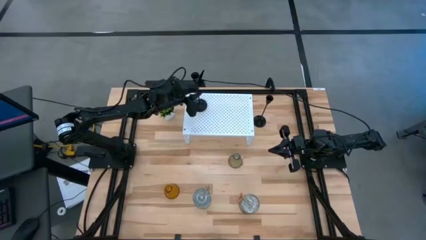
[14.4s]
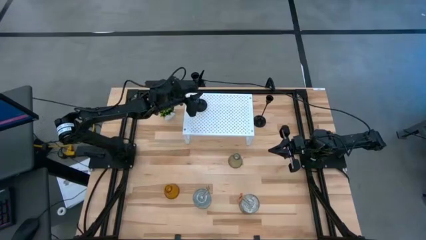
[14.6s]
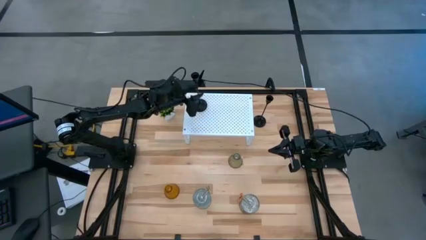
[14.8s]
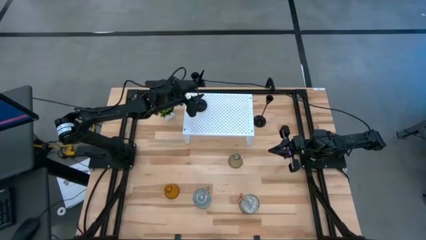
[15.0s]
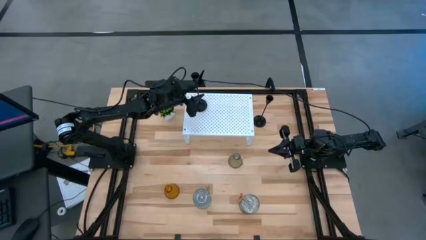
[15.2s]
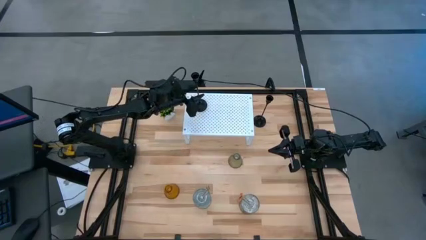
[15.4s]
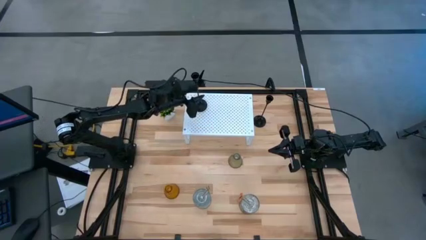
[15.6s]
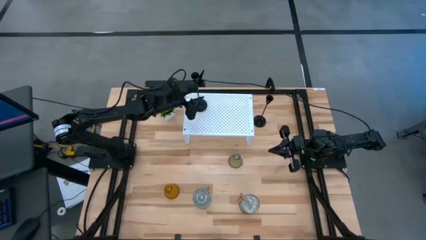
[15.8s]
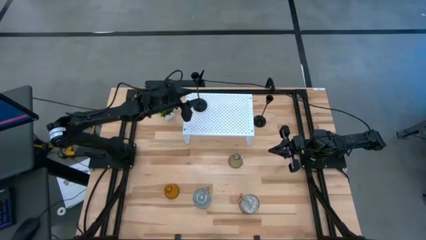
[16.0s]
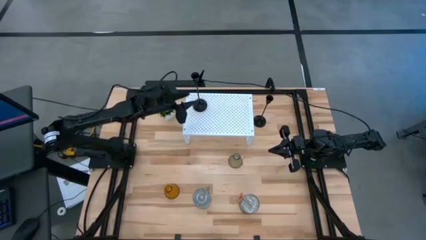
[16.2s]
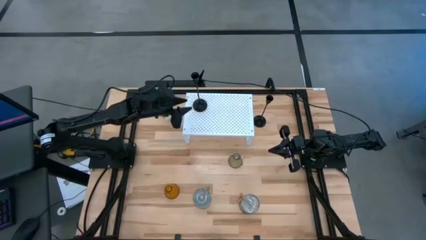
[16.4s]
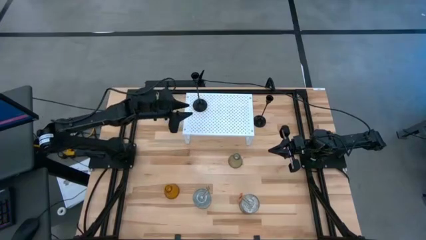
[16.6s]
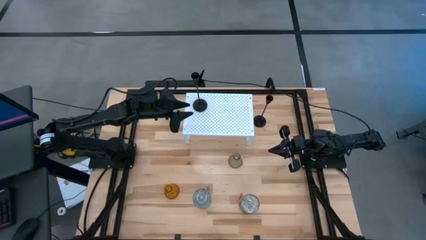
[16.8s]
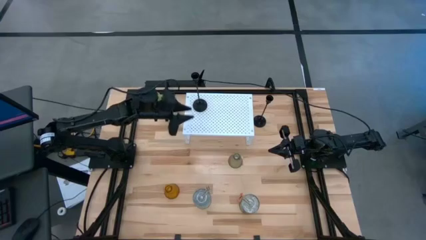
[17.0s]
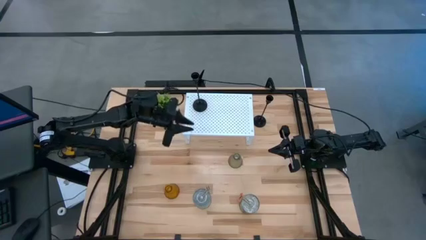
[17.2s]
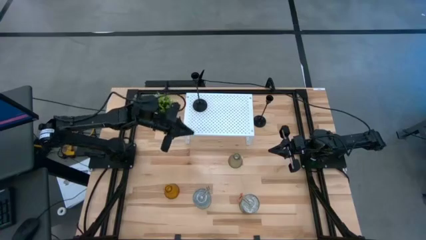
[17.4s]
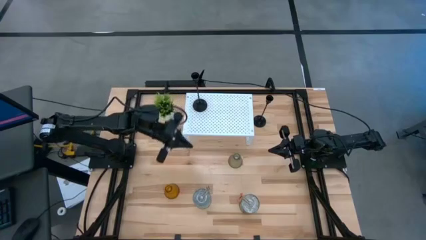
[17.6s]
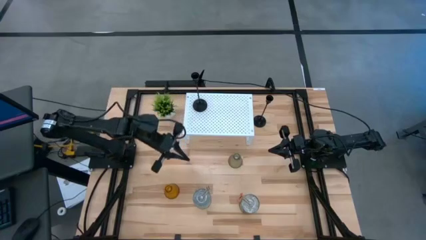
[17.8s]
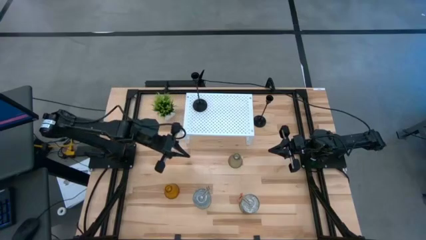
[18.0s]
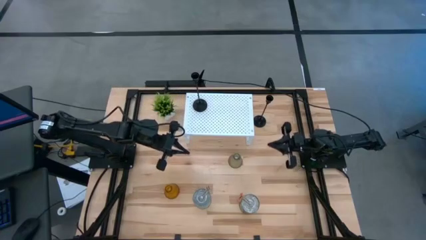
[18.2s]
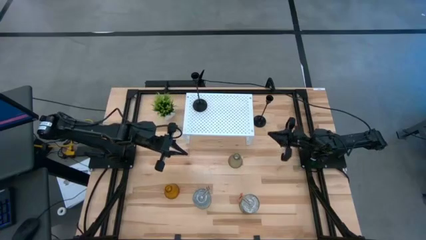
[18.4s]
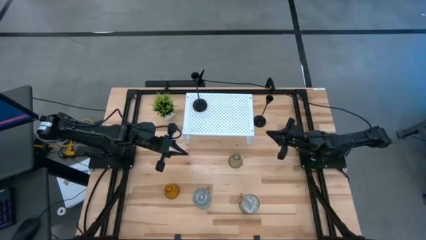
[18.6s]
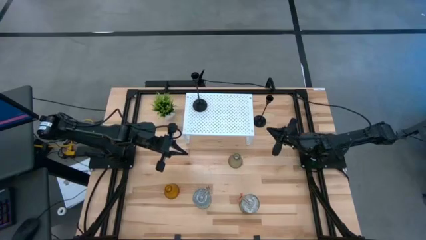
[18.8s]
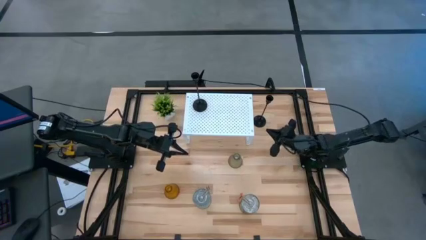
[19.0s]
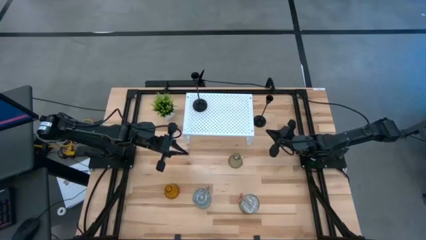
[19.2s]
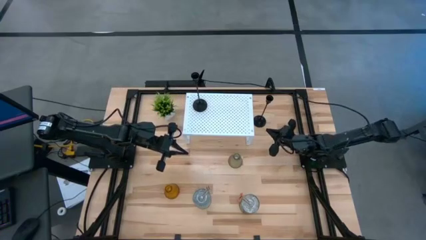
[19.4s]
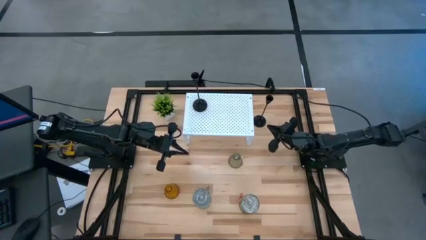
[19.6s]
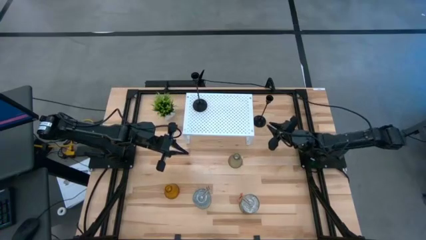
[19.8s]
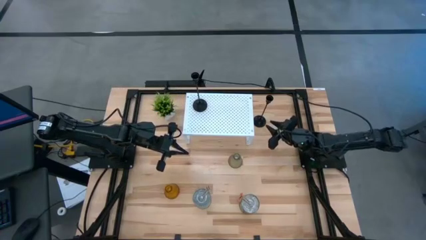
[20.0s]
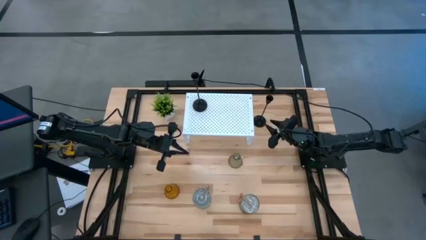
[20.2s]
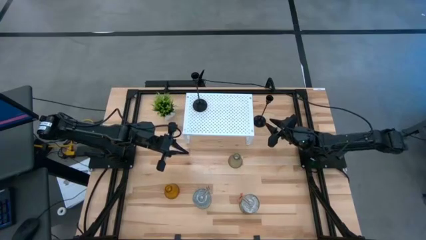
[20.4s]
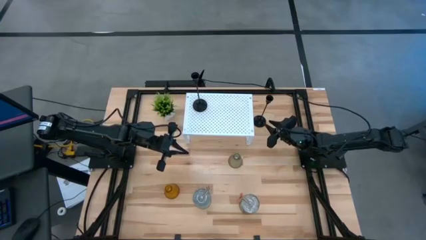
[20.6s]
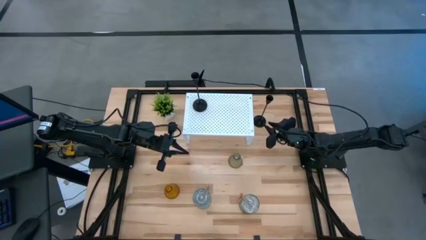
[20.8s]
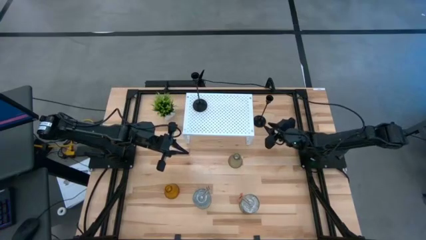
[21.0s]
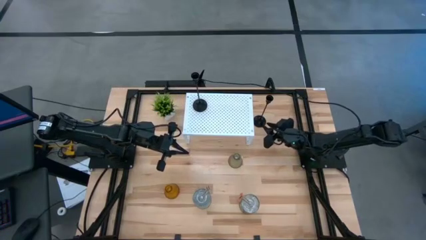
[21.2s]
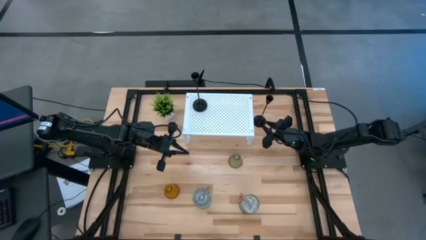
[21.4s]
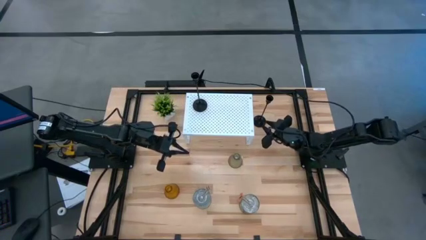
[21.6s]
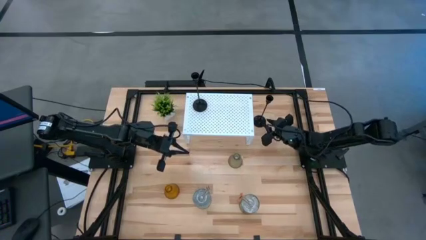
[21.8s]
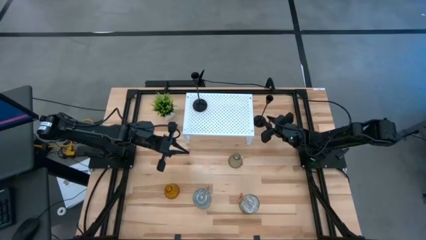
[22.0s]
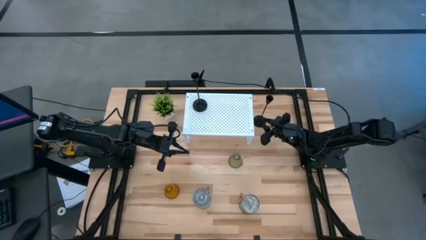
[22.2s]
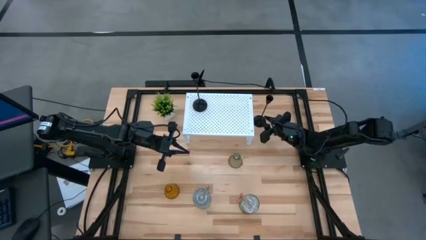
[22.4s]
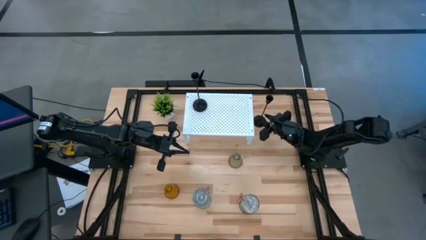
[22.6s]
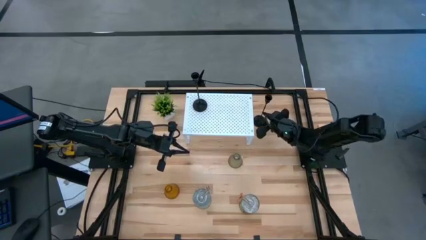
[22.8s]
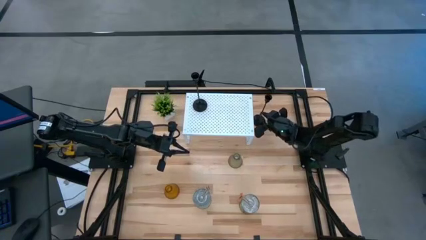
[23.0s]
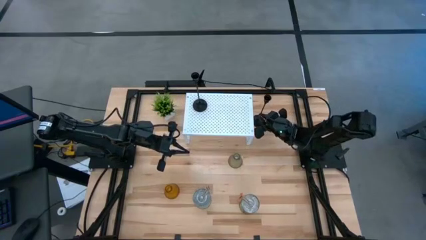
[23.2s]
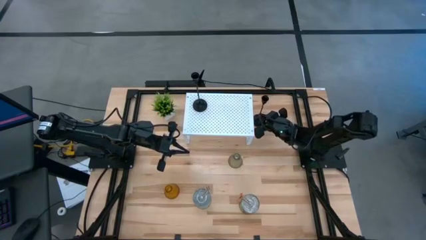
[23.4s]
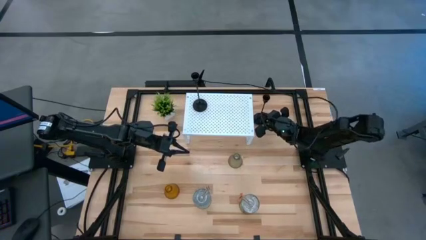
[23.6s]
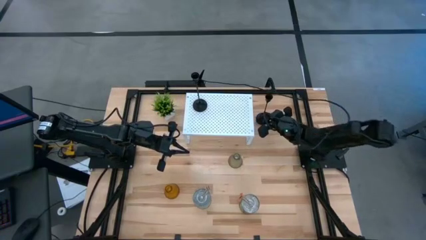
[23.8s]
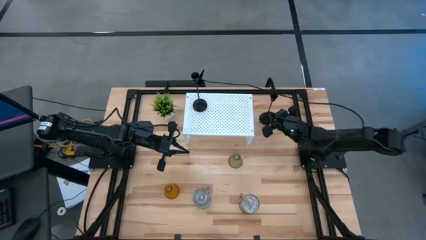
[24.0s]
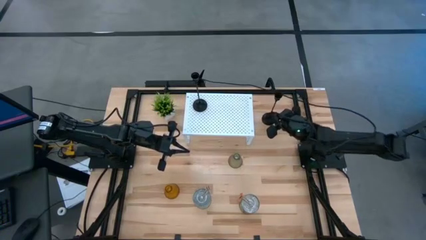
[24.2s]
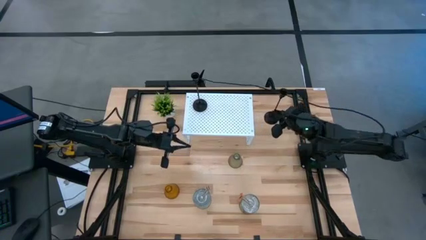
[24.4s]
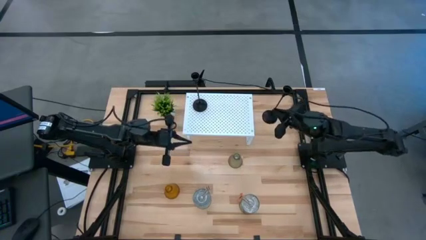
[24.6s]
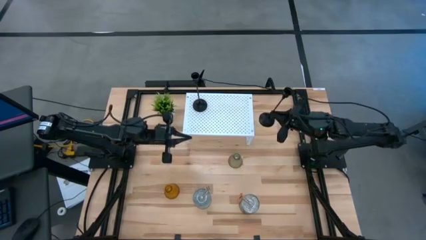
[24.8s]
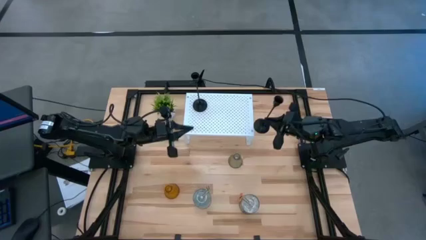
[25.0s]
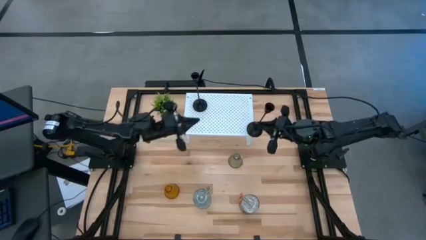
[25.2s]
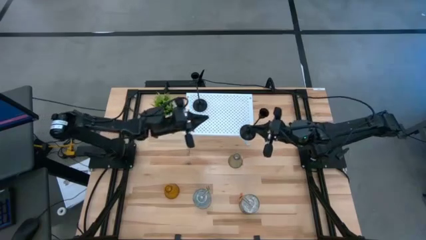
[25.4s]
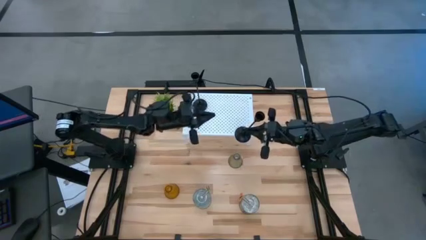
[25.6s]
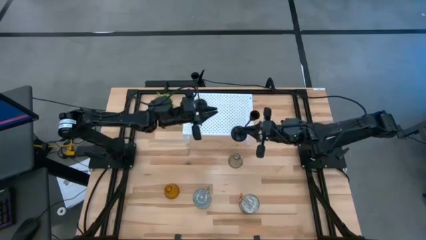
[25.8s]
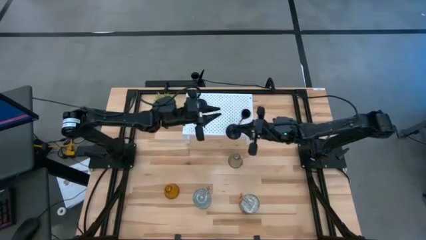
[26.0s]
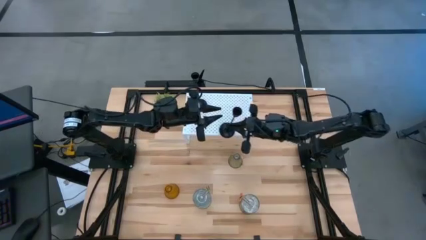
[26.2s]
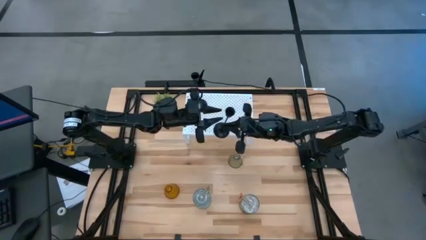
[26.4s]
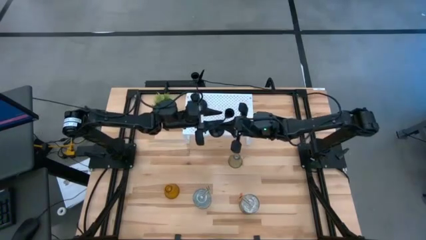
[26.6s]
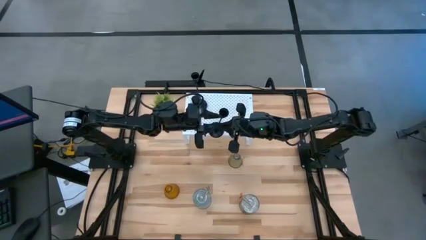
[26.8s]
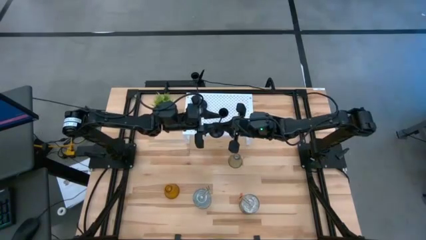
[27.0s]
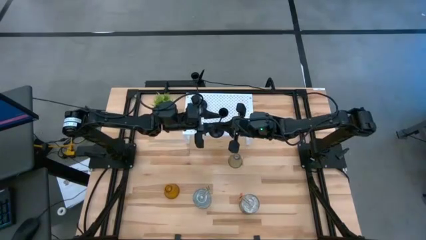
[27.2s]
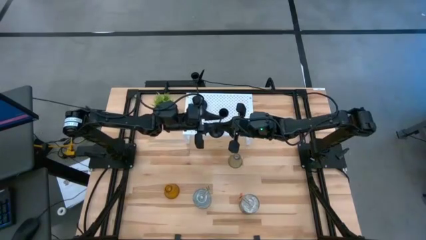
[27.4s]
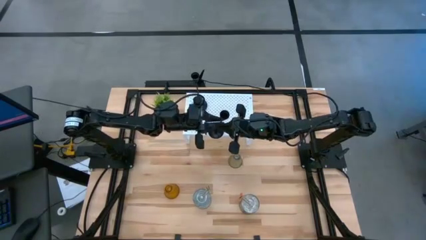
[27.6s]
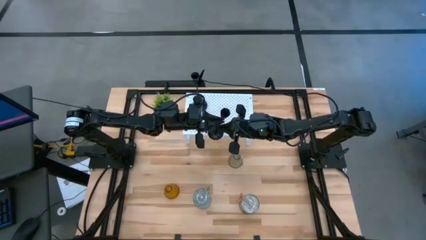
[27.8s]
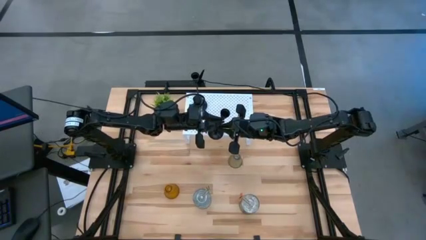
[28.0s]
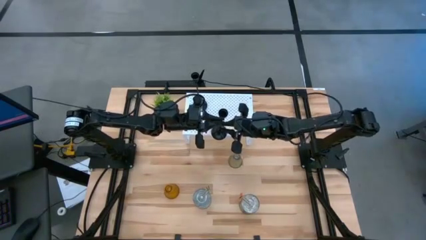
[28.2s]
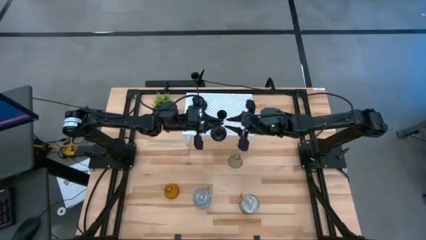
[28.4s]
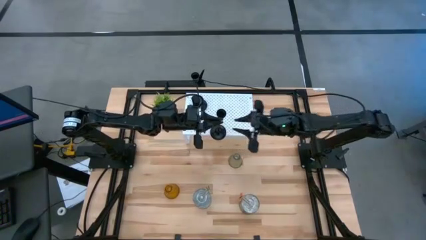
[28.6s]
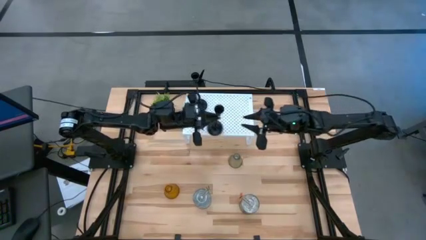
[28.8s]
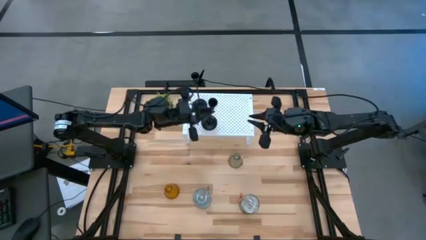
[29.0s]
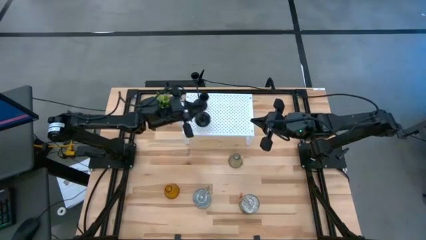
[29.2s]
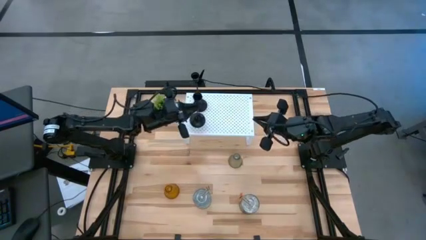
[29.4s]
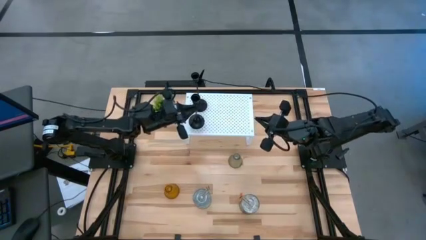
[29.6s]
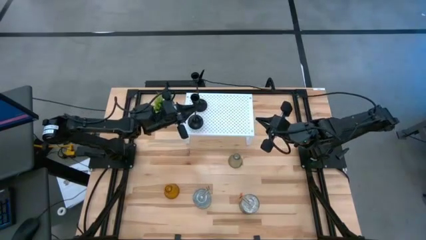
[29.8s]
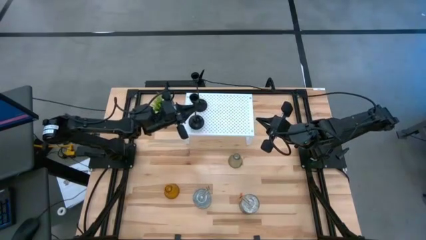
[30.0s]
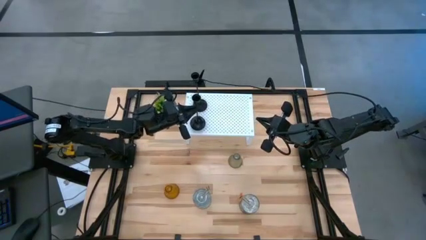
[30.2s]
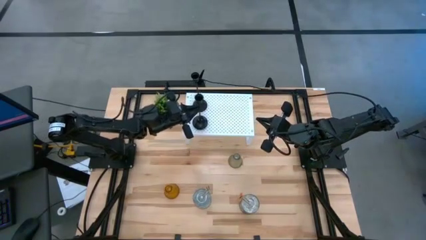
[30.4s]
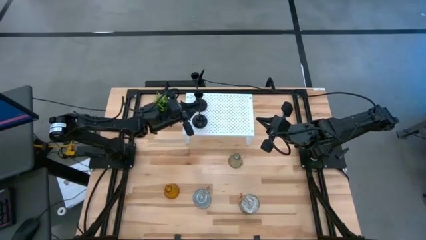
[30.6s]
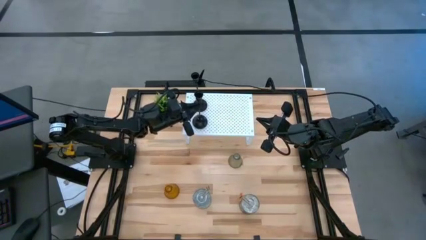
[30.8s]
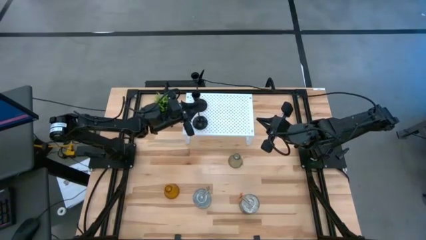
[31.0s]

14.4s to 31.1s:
Task: Pick & Place candle stick holders
Align the black candle holder with the other black candle holder on the shelf
